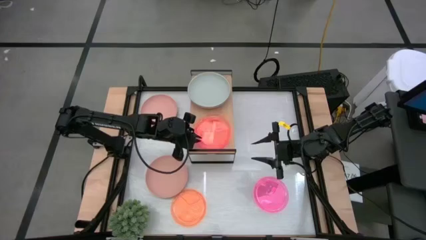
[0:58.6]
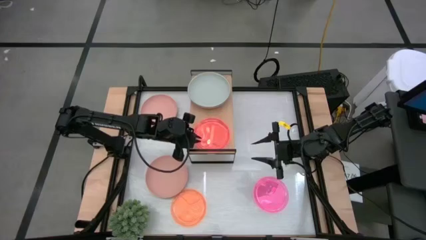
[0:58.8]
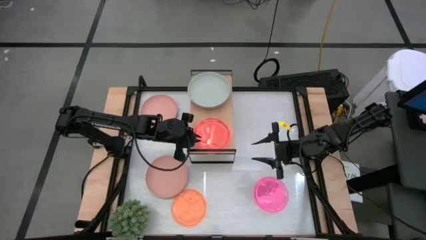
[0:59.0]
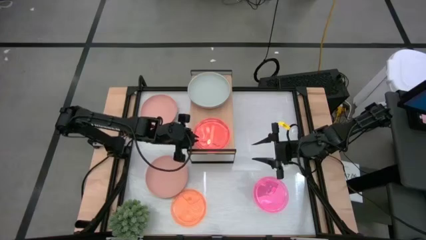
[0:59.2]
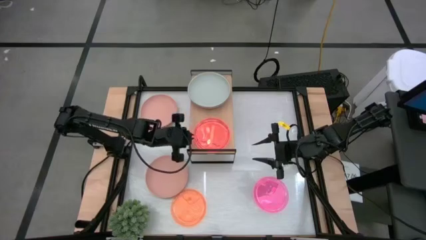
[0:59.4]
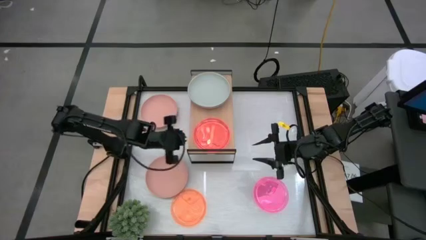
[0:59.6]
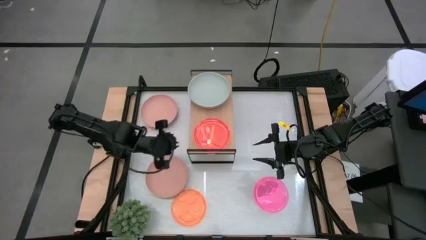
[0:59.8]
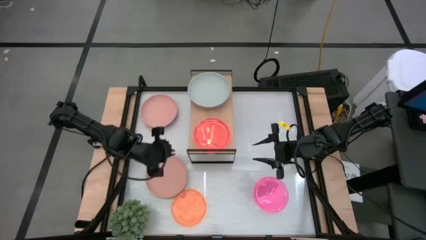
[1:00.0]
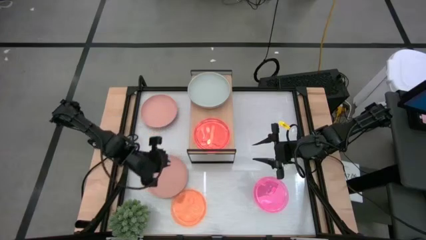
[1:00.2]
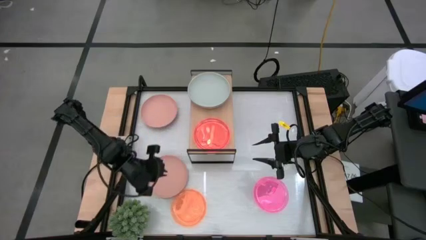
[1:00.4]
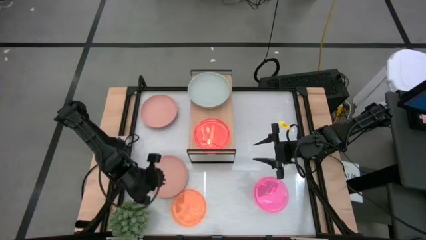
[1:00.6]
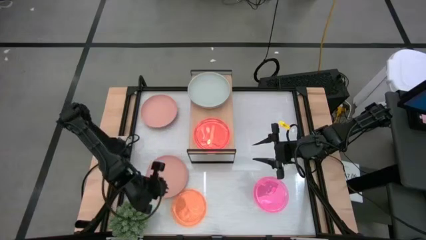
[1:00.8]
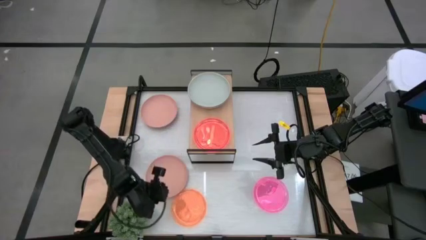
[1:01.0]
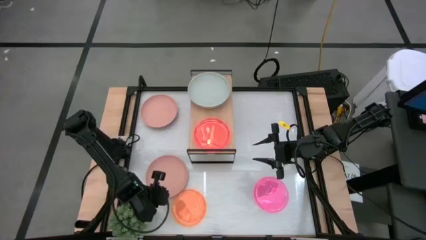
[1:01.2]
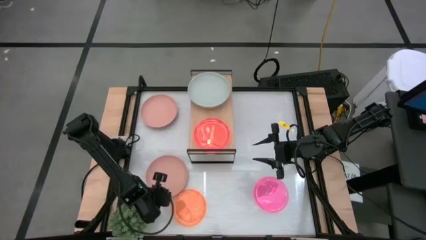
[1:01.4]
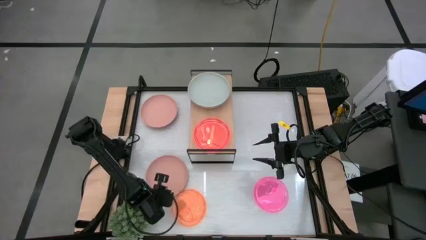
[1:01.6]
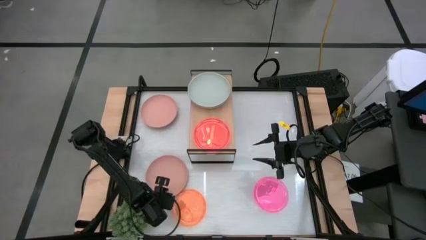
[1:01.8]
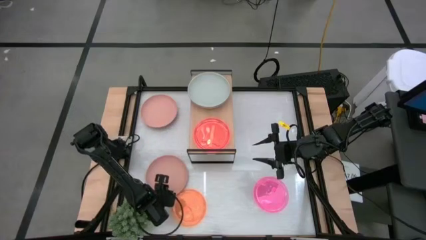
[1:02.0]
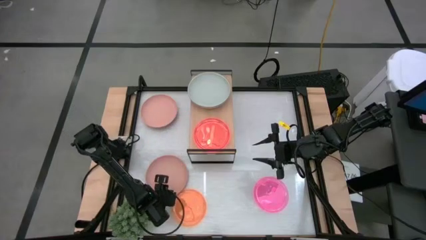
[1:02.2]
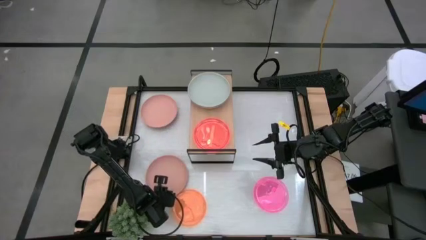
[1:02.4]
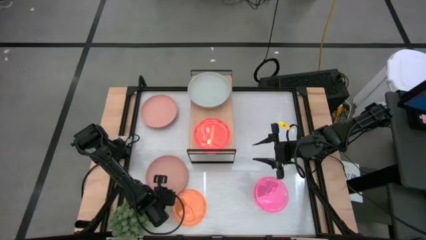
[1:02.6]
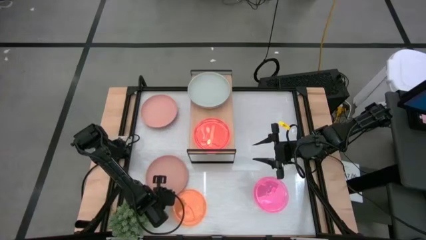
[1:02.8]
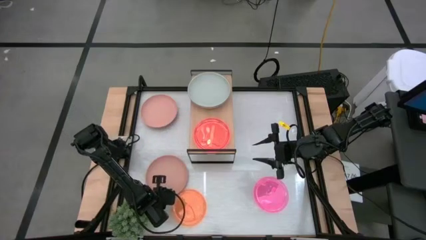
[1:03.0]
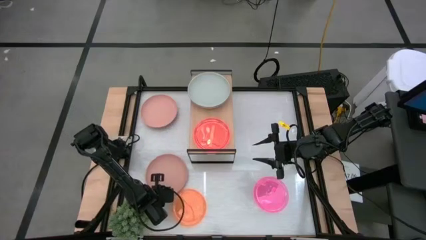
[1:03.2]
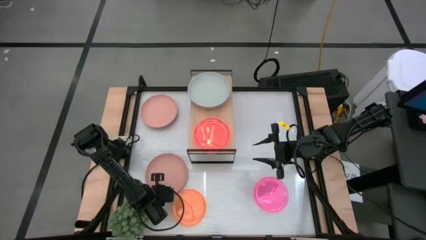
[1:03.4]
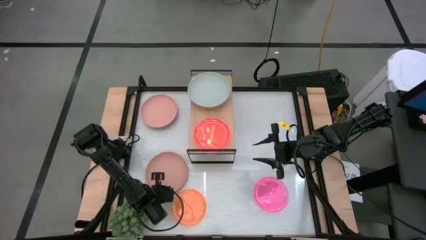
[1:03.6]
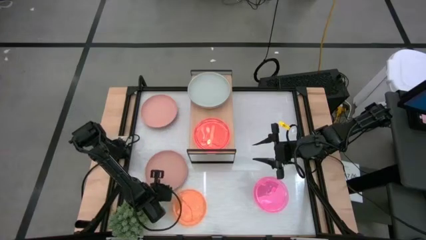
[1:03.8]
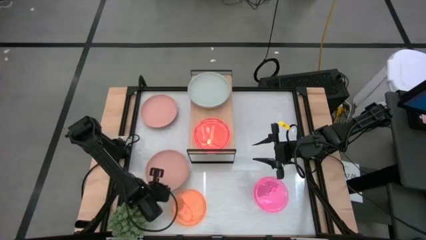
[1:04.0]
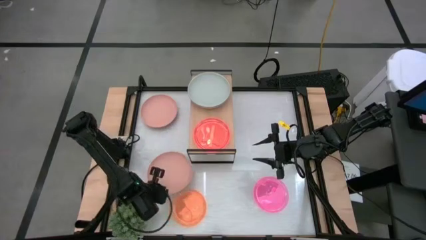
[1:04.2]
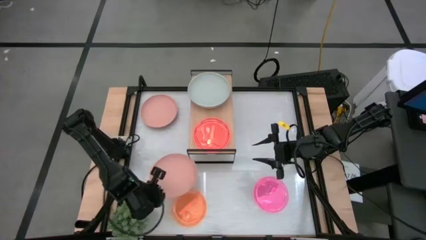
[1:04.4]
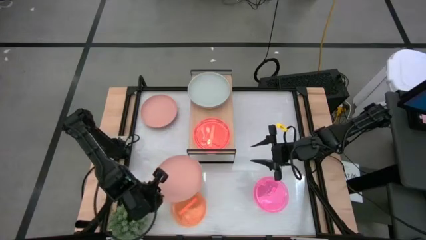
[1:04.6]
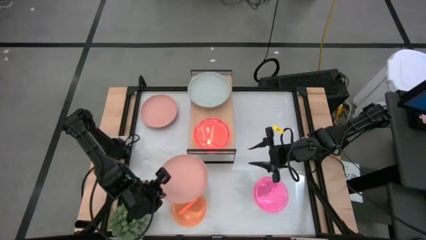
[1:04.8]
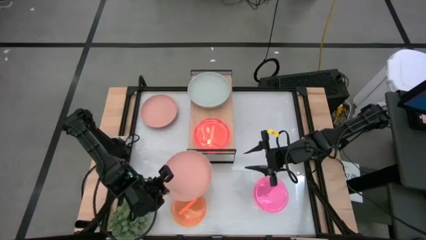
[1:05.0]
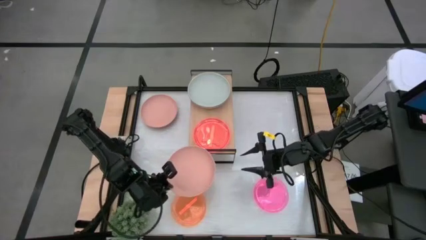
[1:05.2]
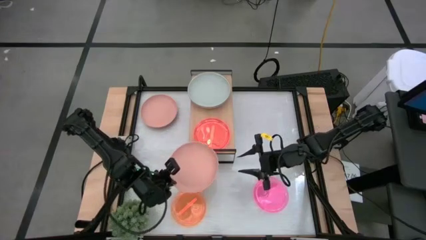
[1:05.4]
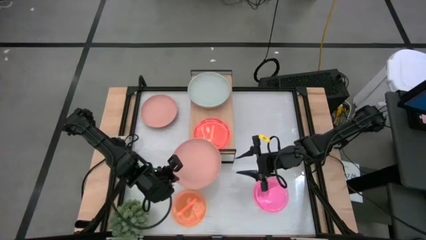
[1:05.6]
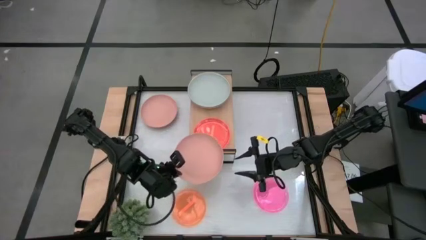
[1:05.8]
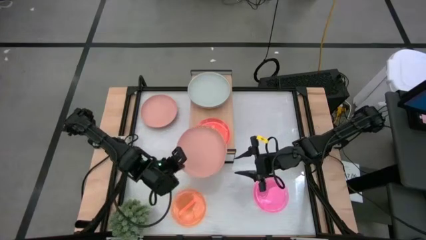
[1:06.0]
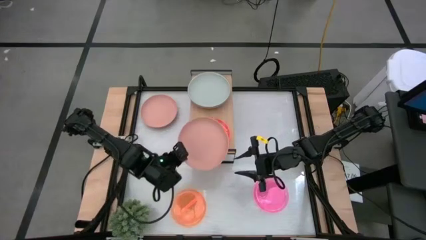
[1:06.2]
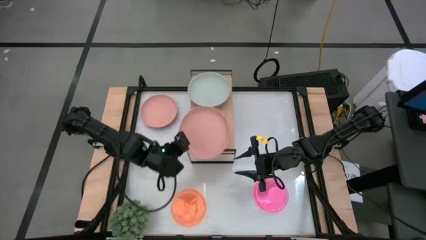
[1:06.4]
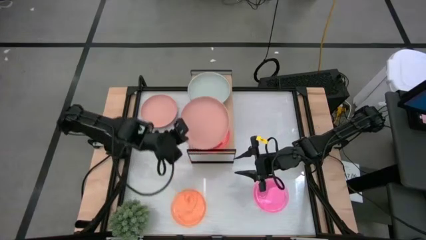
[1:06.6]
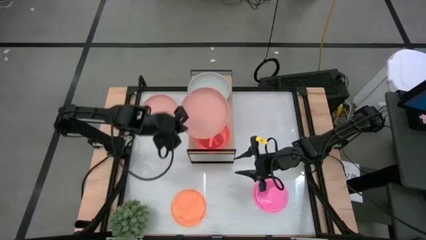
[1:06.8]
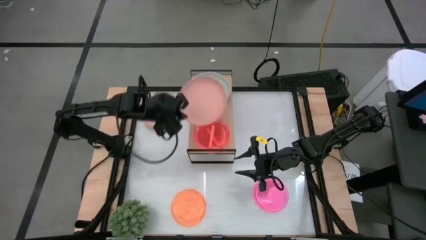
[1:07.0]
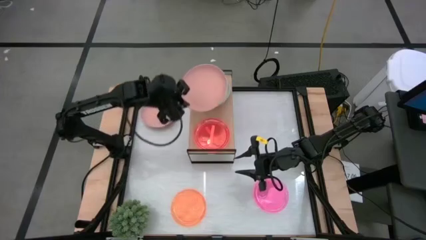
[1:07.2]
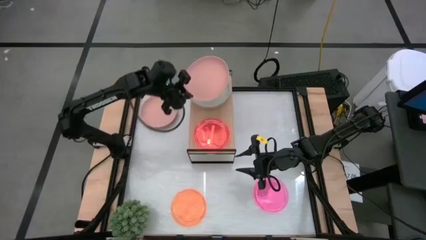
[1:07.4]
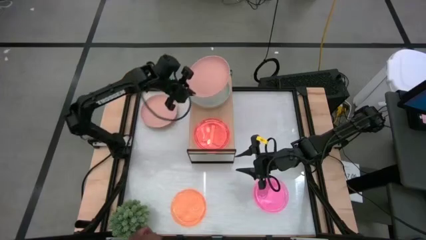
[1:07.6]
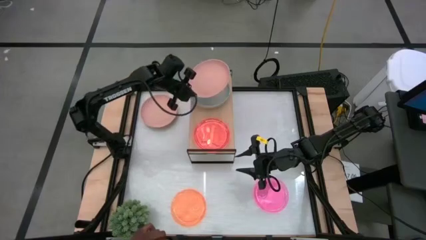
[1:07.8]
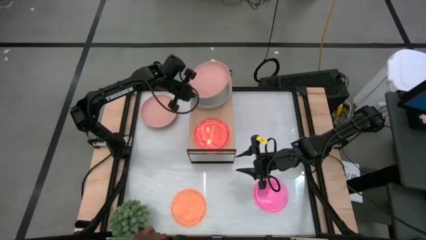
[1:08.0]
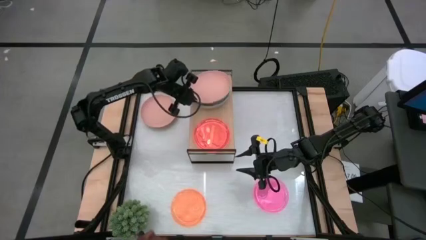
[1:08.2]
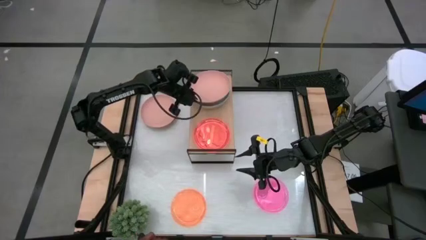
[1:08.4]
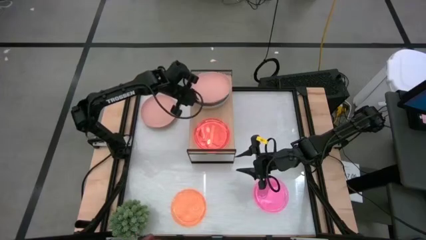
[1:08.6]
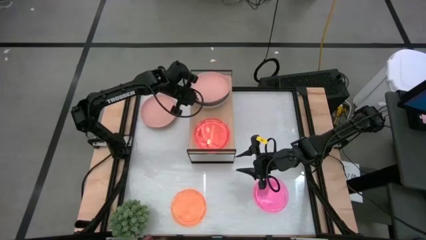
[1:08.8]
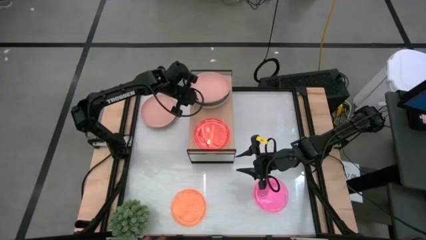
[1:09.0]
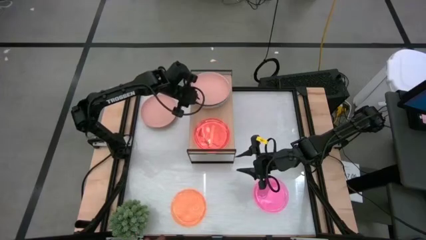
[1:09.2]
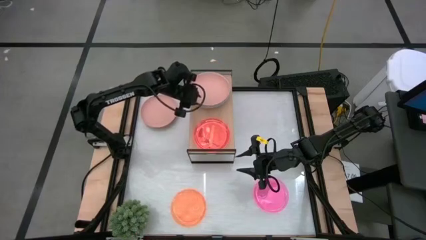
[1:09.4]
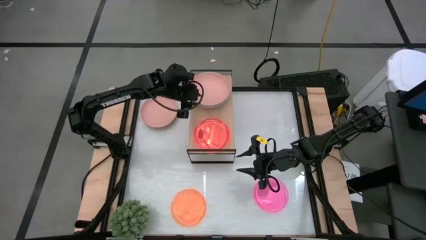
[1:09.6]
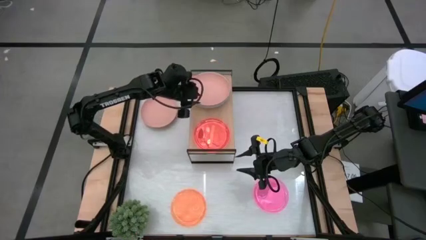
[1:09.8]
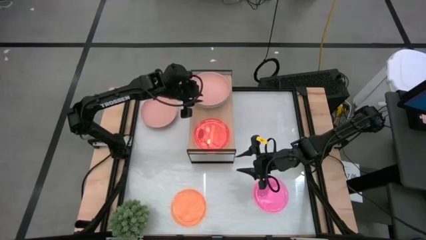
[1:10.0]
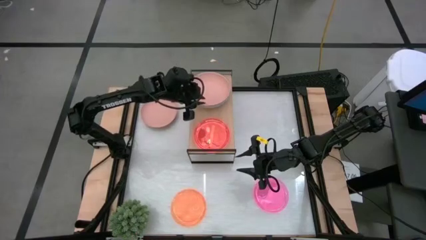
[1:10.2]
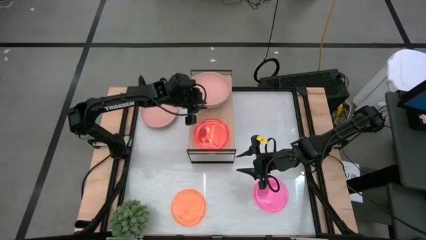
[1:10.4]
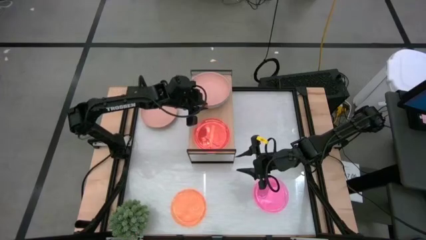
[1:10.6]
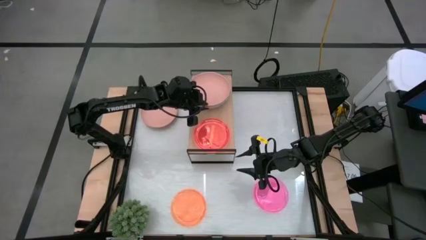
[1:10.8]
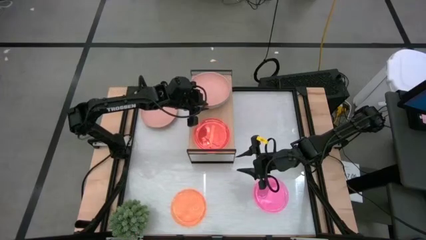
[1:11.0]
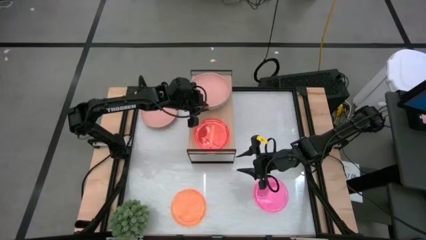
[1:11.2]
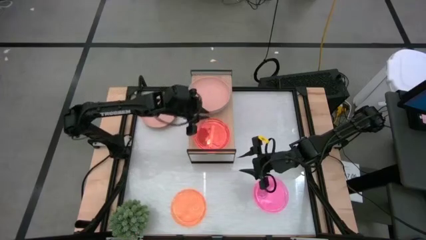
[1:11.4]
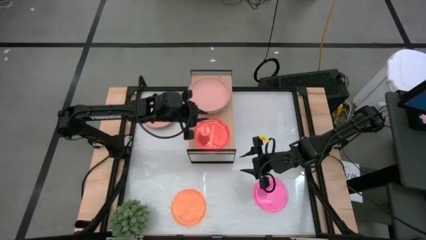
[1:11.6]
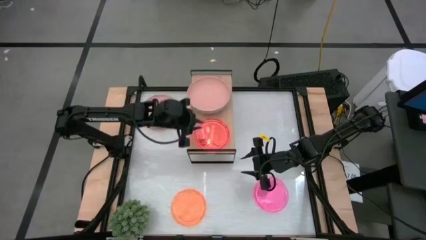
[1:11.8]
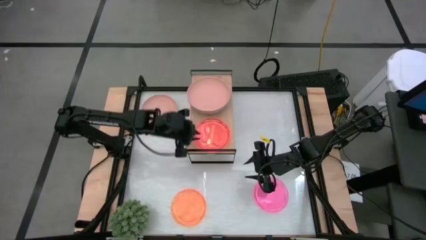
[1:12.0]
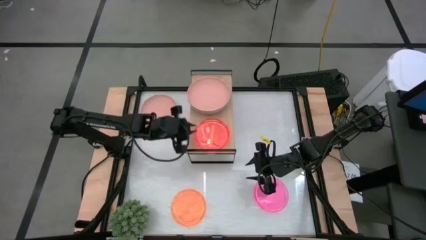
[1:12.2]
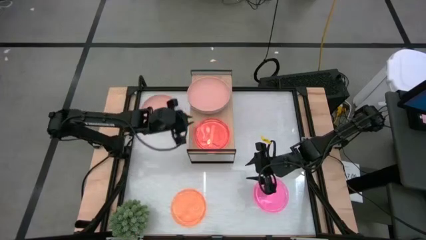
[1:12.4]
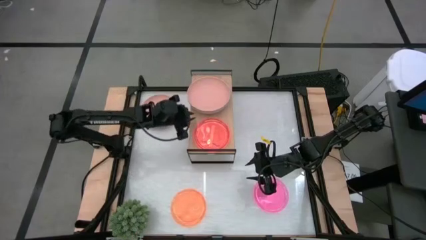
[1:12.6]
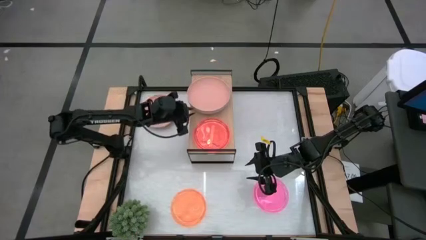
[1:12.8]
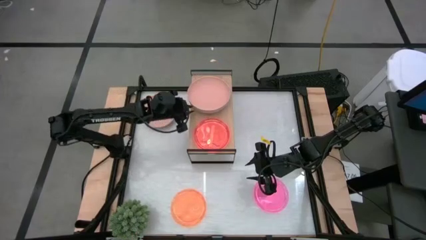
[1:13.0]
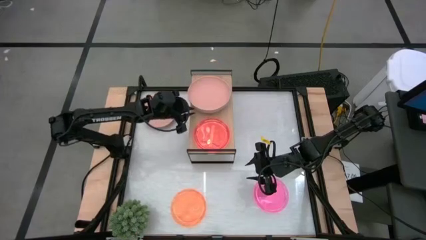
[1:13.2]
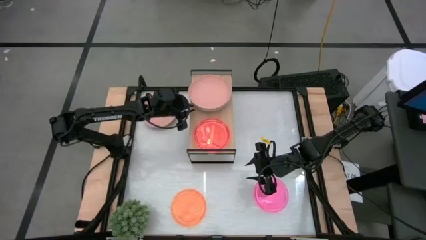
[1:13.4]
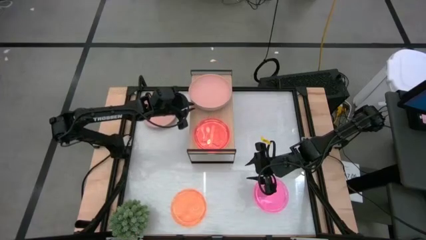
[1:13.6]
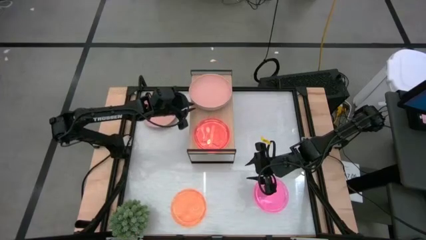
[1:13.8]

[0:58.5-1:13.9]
Task: Place and stack plates onto a shelf
Stack the bottom light orange plate on top of the gray plate on the shelf
